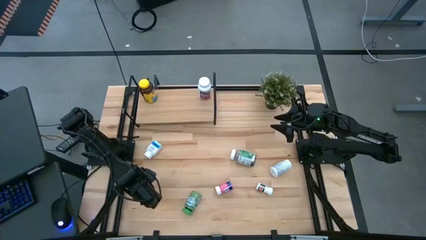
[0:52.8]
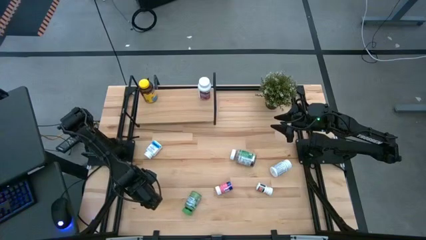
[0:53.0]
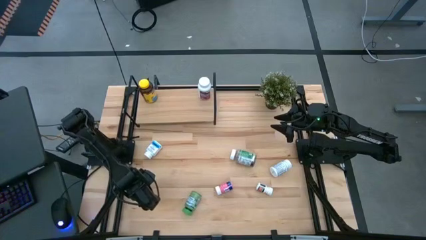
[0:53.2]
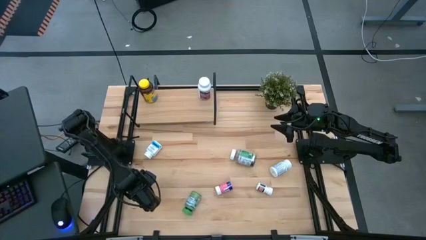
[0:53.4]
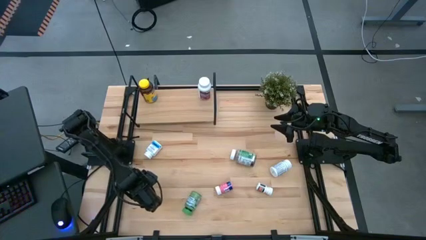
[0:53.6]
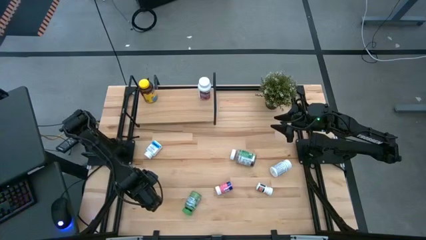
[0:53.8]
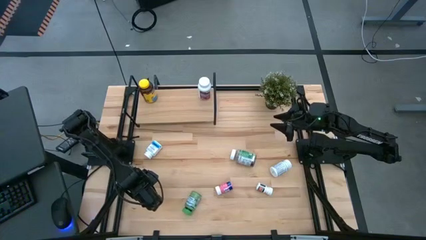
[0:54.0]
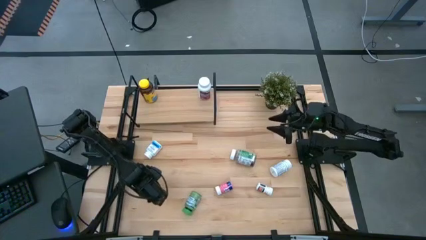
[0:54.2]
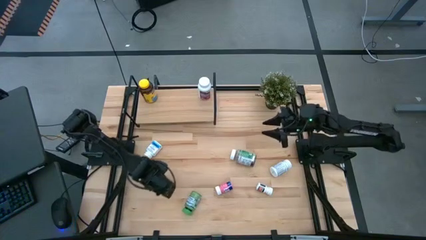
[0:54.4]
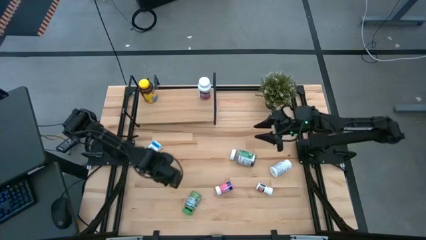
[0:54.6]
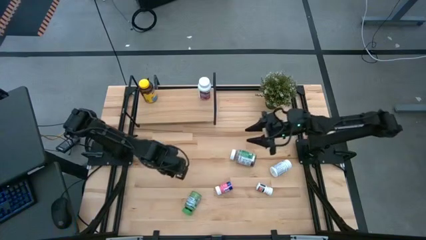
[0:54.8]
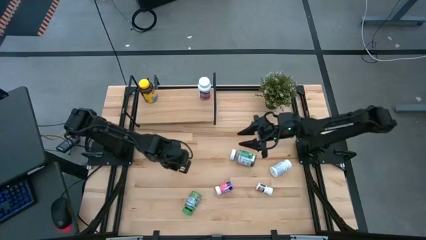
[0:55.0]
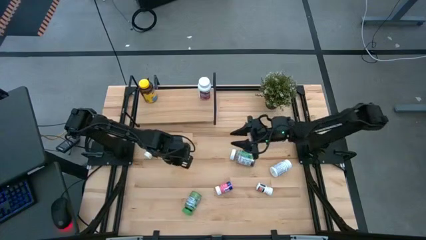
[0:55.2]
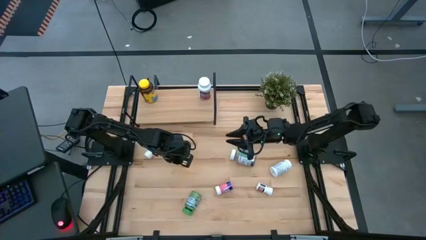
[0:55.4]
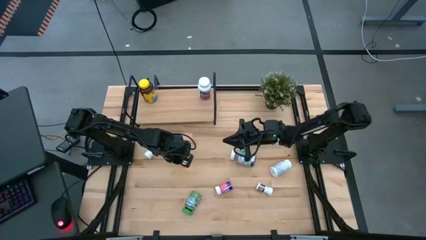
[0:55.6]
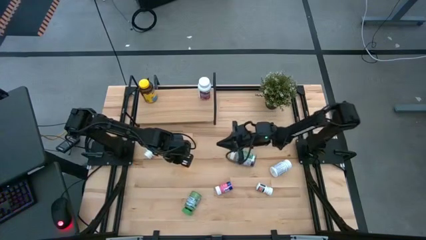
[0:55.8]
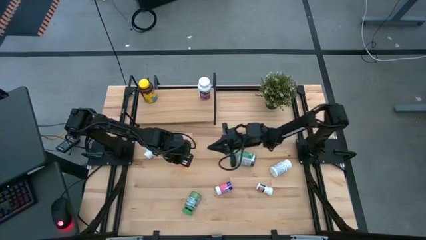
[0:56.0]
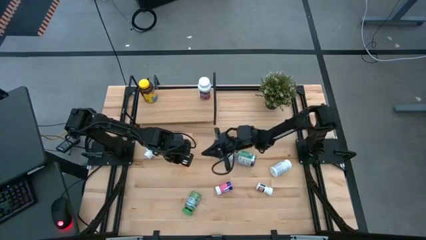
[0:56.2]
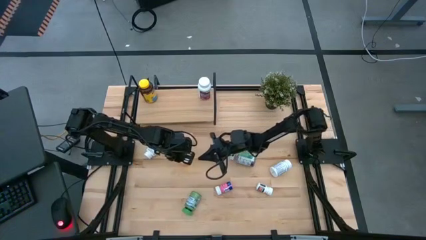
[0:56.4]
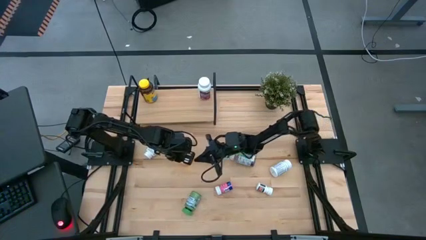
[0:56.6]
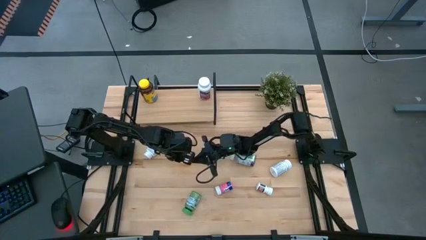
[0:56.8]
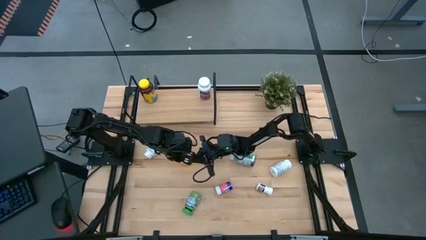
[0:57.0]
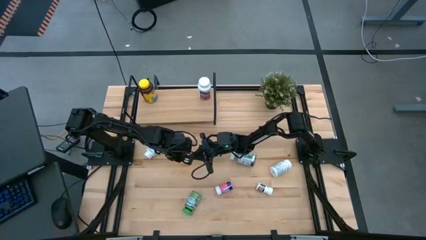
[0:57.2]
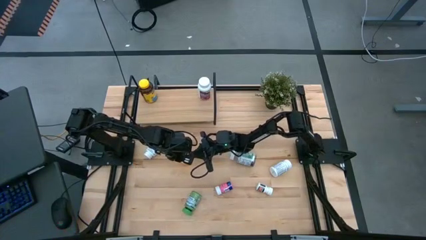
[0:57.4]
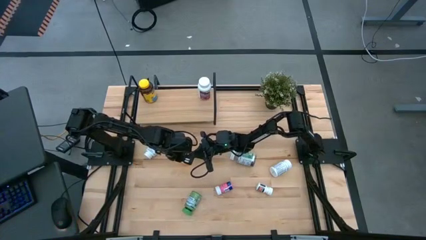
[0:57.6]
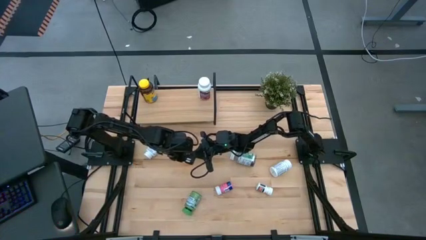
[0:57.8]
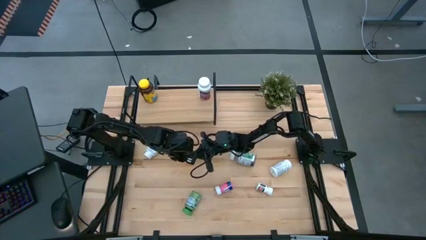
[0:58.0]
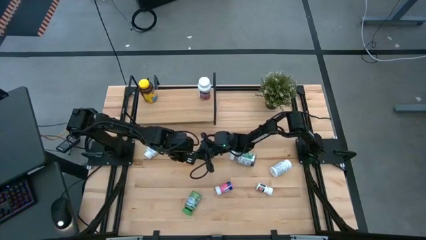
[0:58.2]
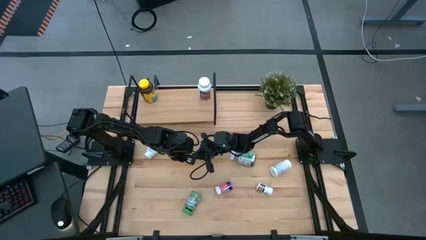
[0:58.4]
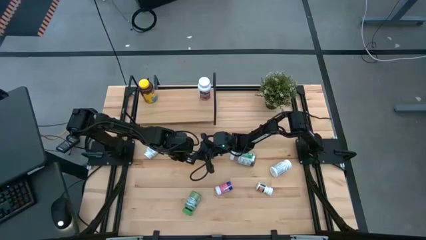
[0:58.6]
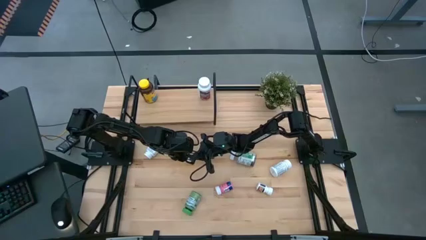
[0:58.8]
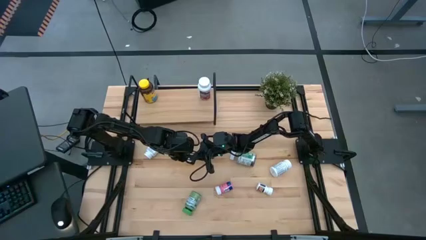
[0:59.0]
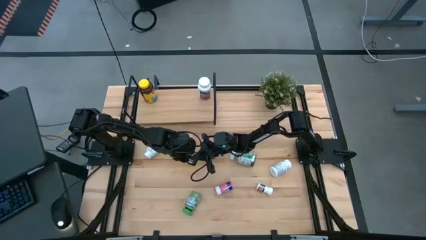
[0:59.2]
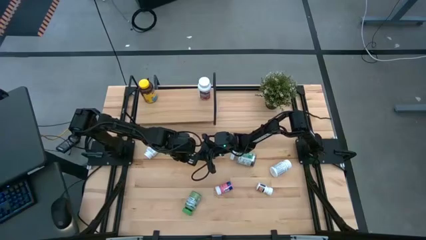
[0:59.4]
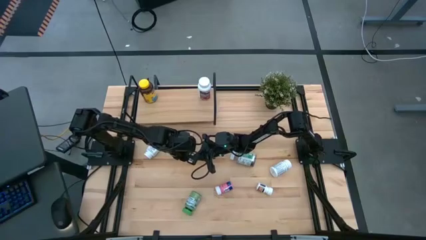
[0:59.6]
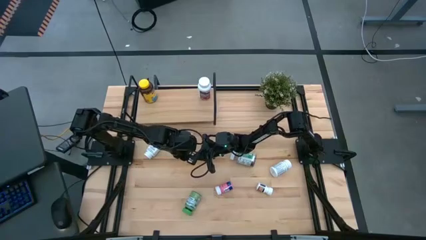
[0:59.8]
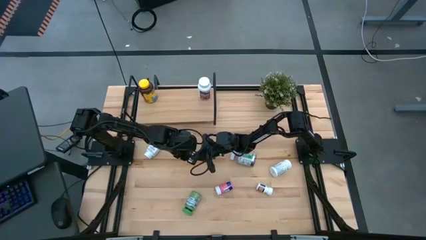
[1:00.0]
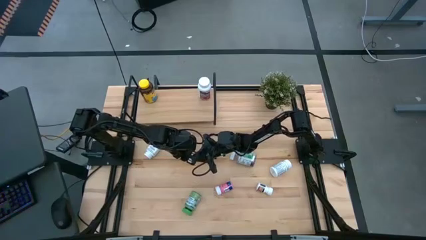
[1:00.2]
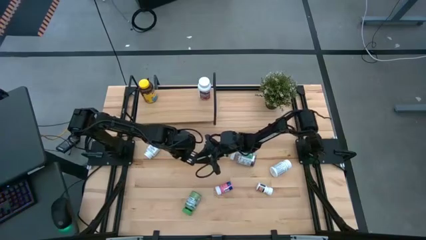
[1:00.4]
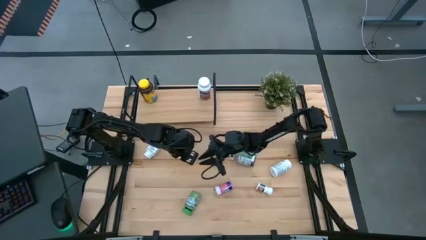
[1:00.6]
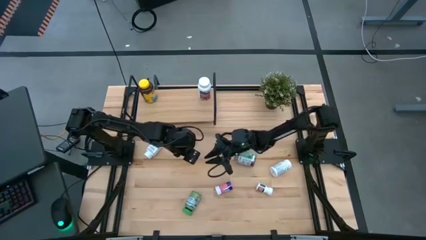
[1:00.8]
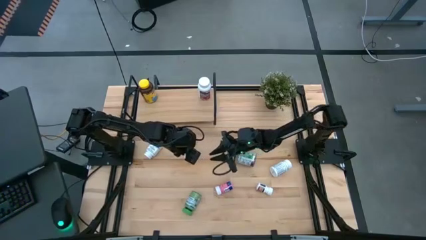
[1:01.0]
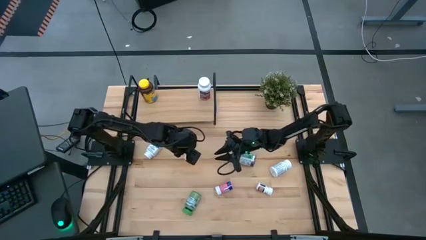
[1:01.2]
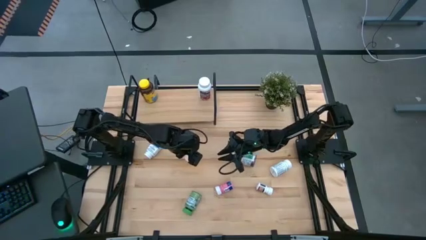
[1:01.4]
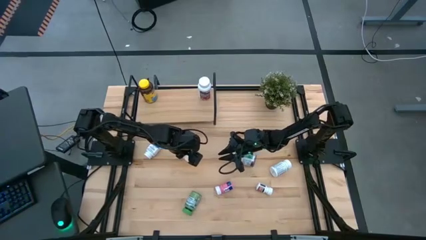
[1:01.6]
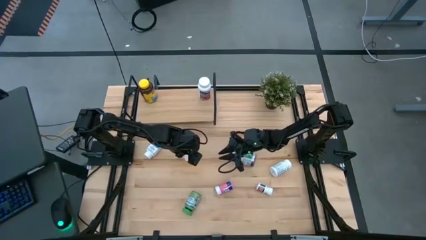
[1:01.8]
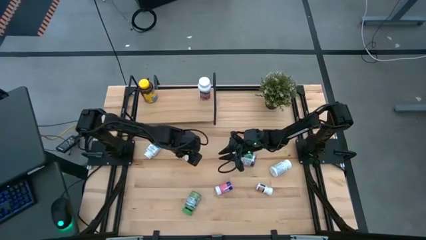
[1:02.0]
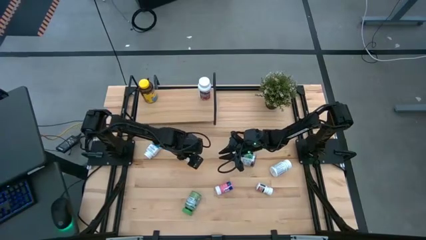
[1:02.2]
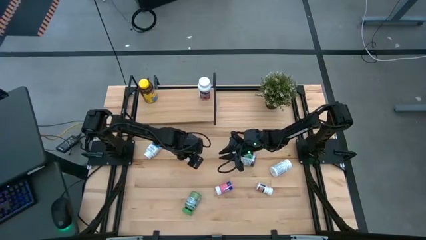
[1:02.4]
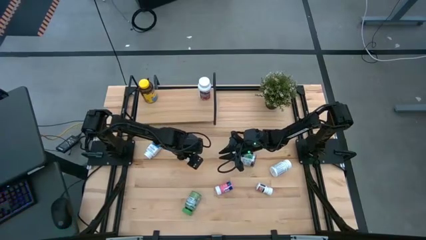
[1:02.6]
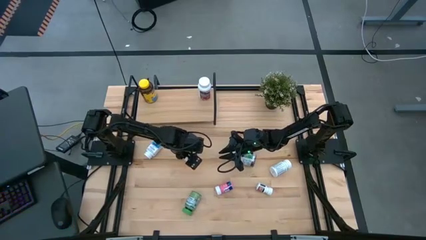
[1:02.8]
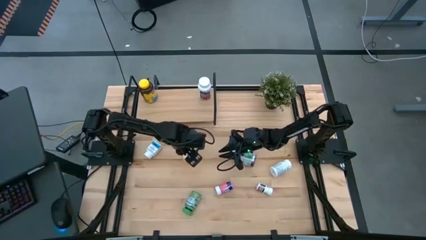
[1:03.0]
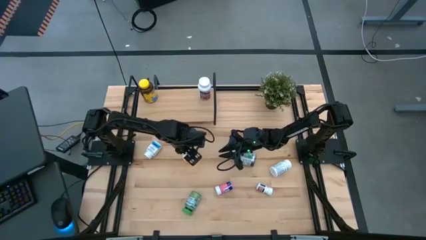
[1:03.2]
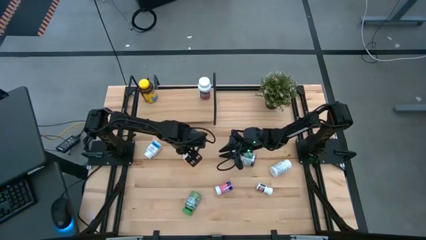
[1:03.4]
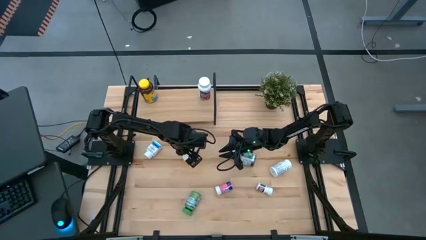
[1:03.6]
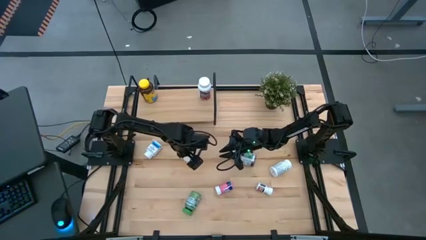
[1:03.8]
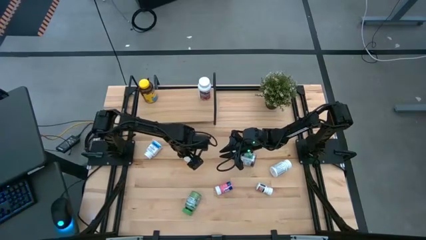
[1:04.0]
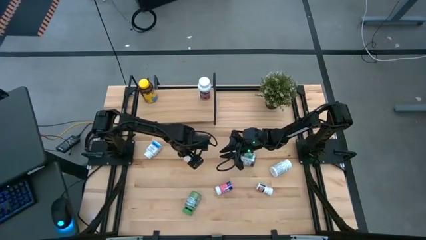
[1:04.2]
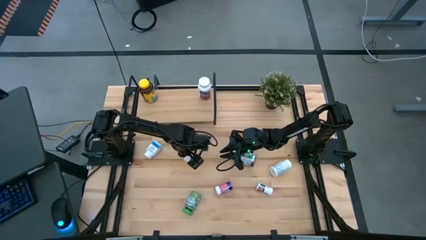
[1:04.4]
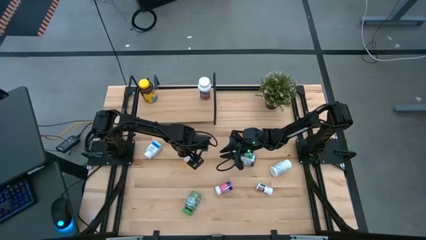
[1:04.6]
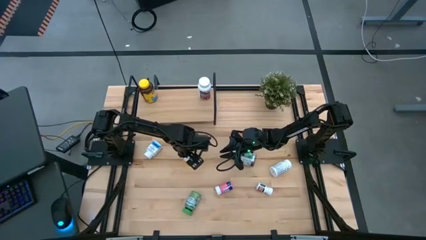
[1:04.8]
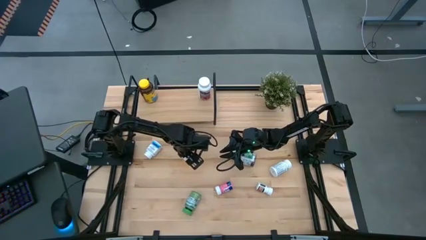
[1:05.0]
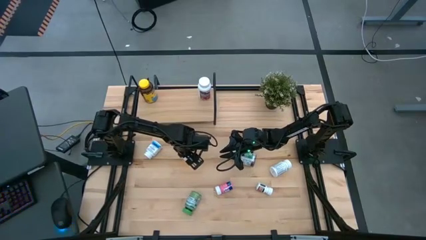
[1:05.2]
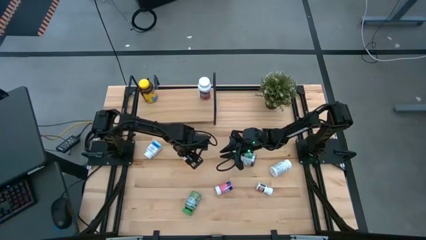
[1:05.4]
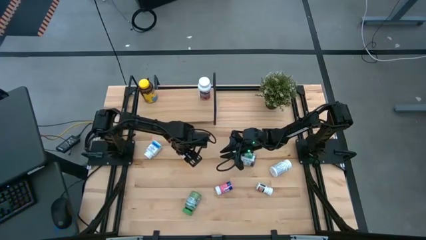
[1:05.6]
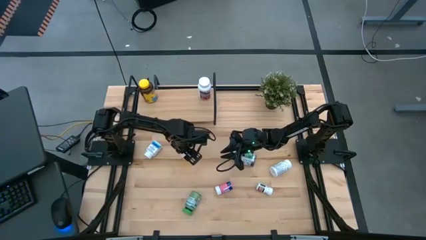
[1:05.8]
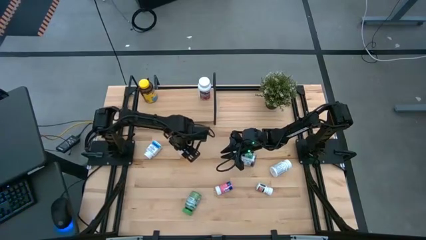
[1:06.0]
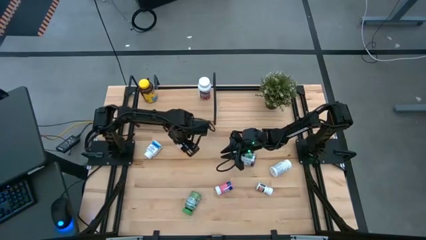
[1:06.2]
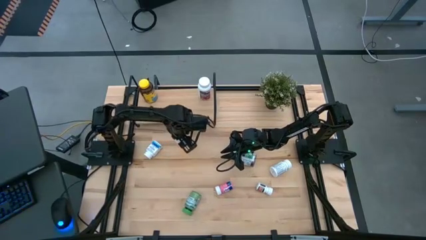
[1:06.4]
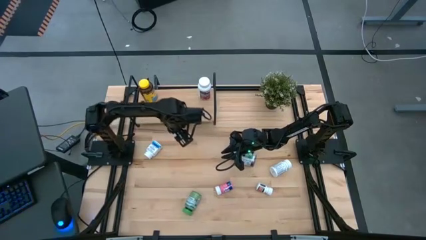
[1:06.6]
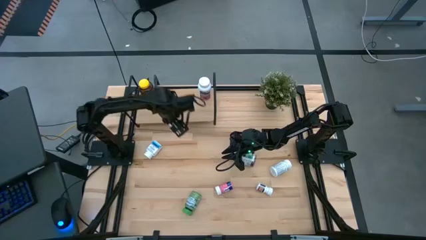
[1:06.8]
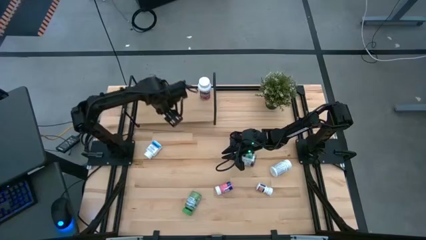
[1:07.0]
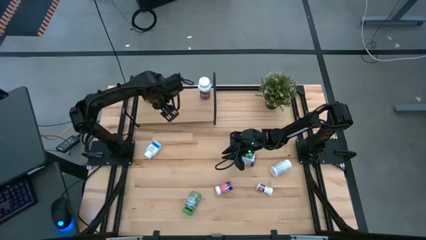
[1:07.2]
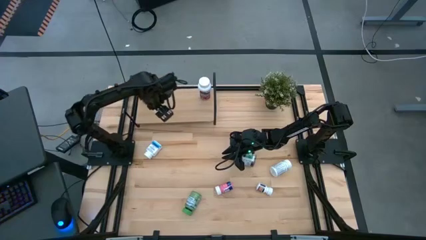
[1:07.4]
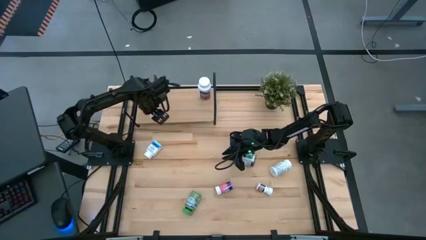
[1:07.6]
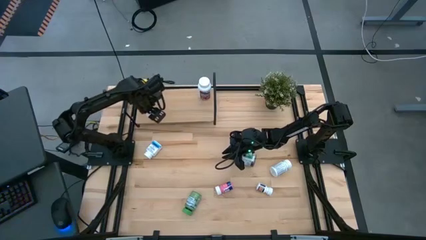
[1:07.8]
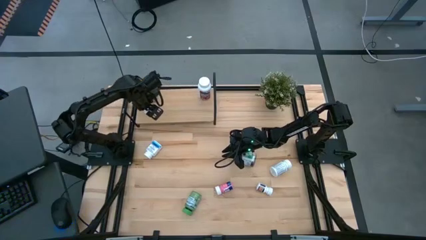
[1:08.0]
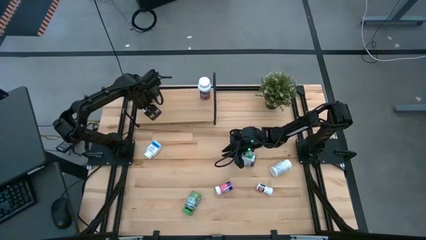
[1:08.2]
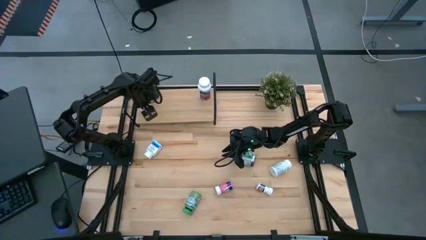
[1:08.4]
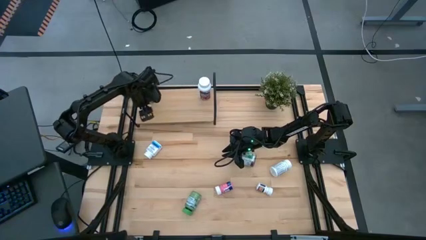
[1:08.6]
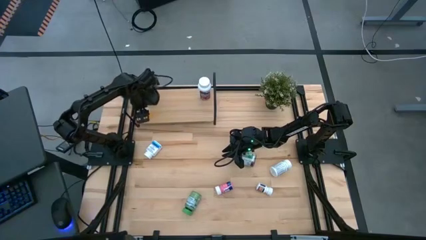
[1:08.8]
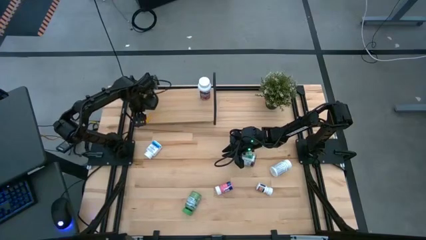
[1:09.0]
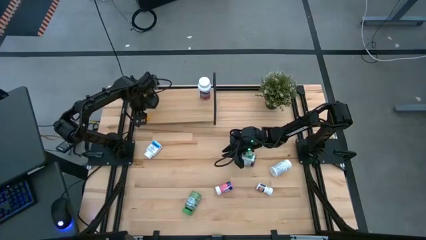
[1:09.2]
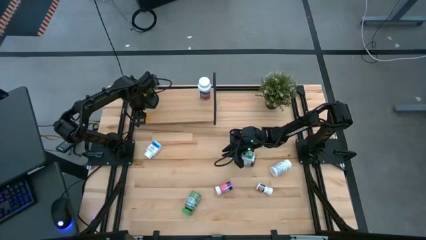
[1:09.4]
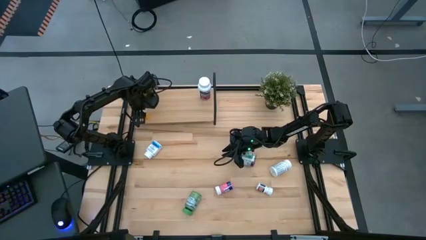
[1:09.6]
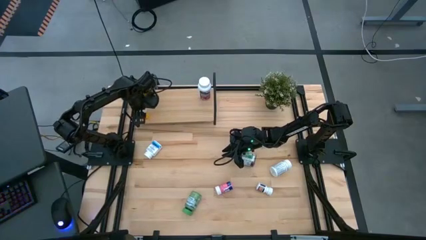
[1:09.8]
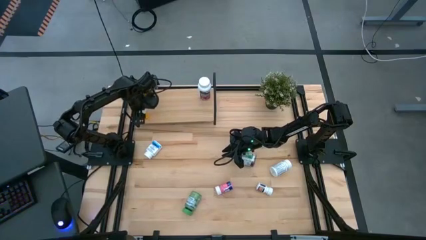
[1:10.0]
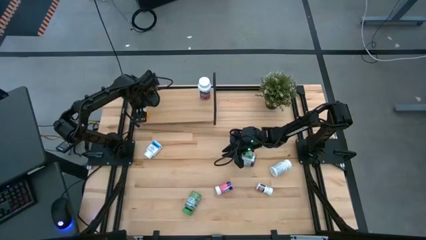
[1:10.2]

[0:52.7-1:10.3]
Task: Pick and place medicine bottles onto shelf by color
Put the orange medicine bottle on the shelf
